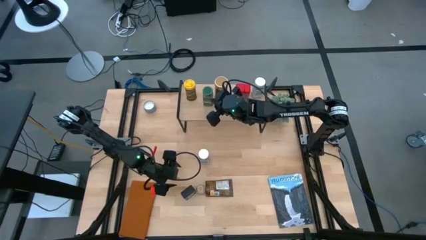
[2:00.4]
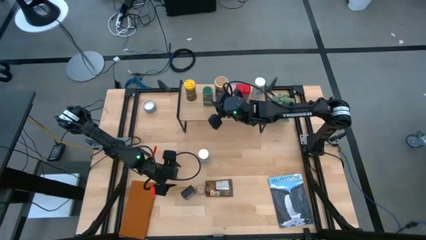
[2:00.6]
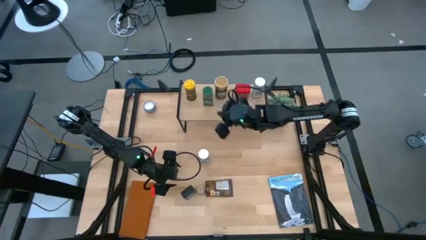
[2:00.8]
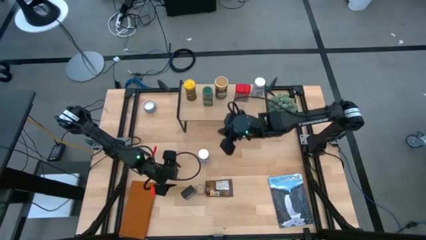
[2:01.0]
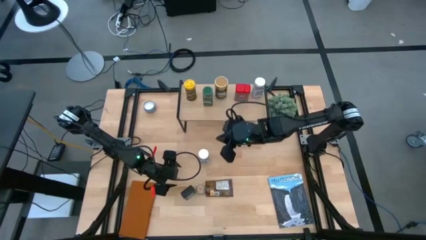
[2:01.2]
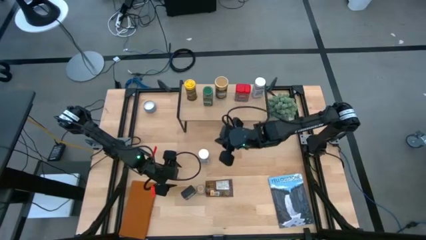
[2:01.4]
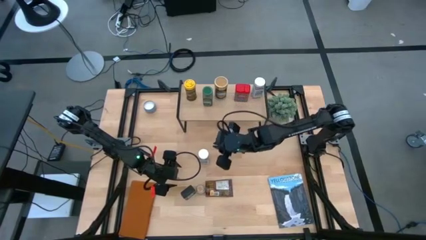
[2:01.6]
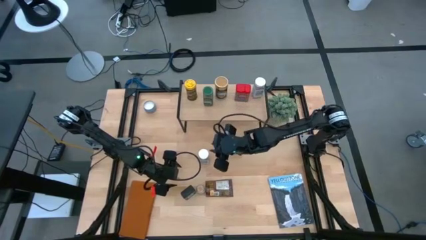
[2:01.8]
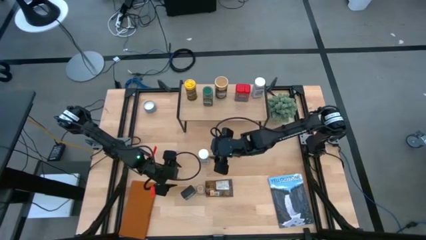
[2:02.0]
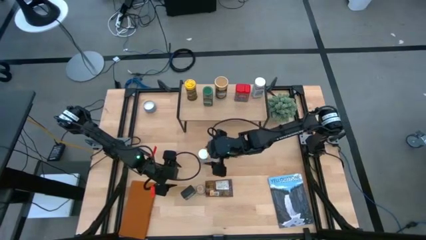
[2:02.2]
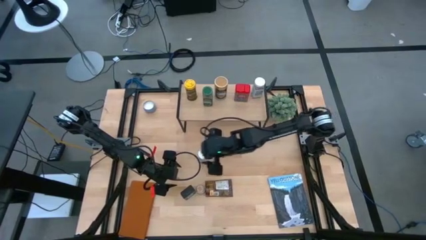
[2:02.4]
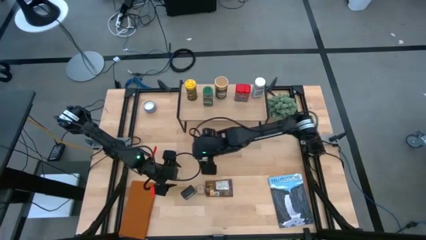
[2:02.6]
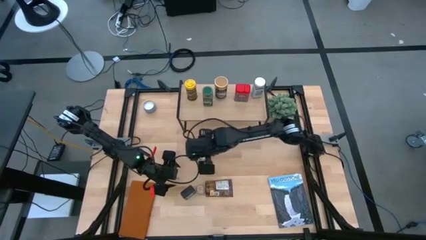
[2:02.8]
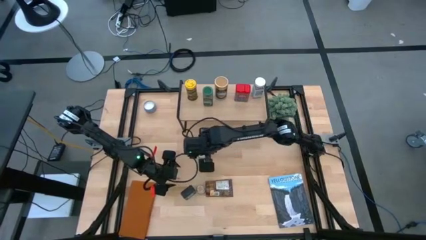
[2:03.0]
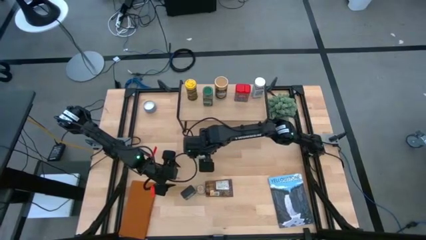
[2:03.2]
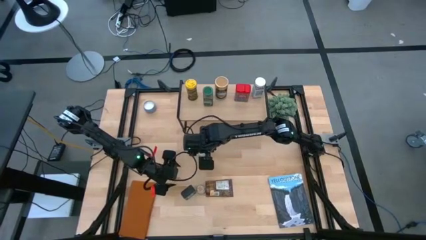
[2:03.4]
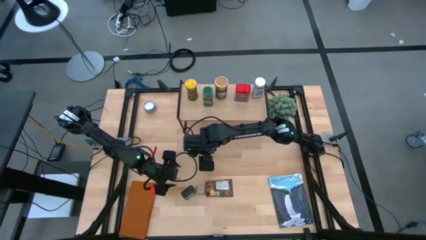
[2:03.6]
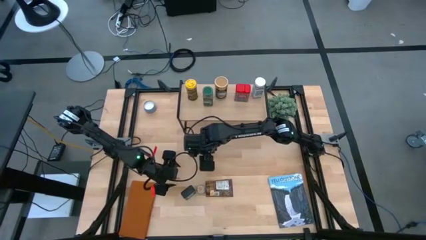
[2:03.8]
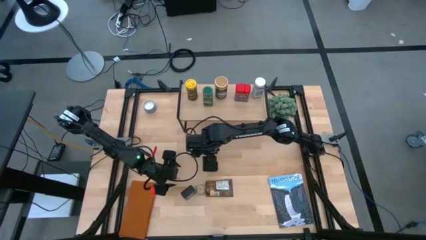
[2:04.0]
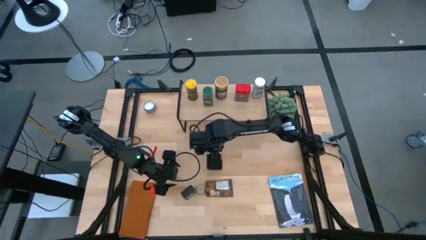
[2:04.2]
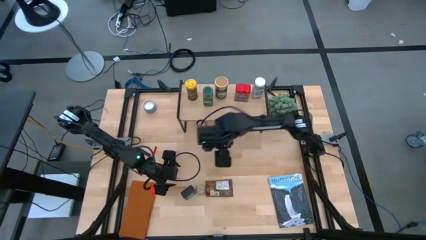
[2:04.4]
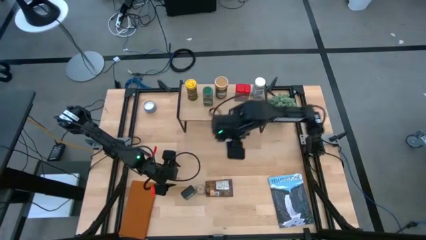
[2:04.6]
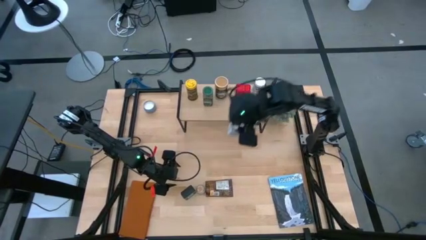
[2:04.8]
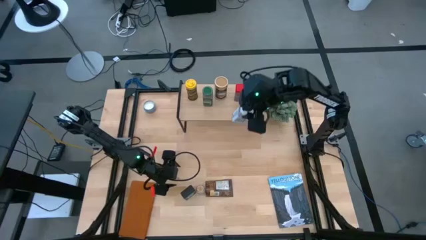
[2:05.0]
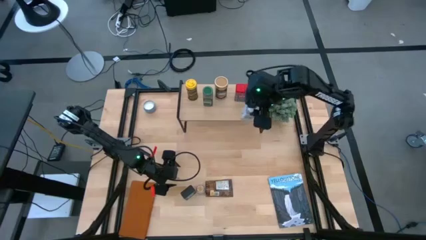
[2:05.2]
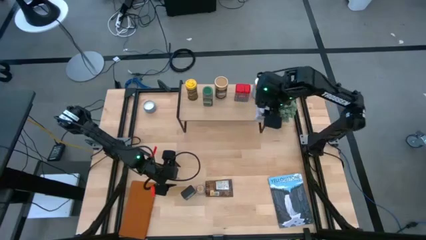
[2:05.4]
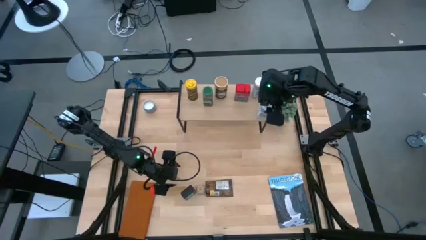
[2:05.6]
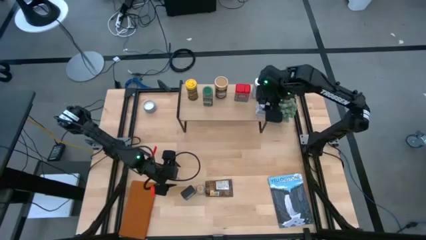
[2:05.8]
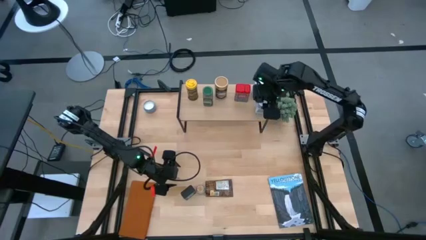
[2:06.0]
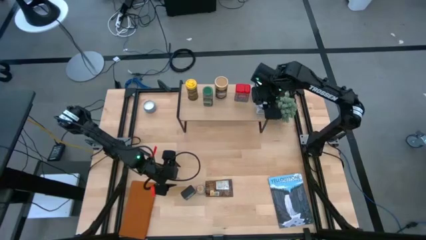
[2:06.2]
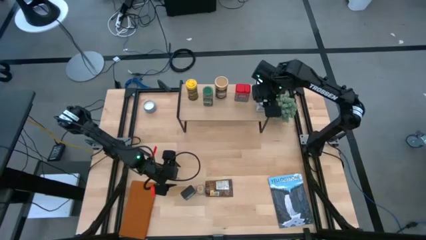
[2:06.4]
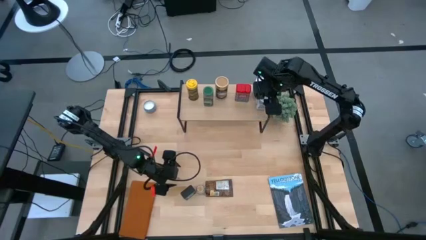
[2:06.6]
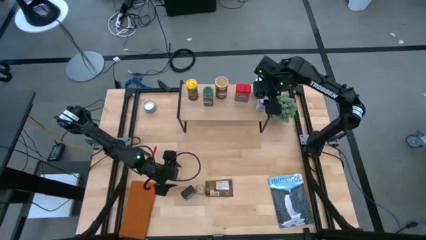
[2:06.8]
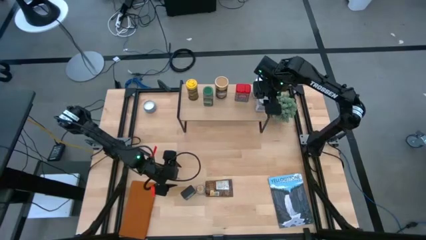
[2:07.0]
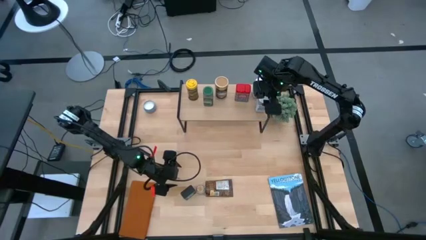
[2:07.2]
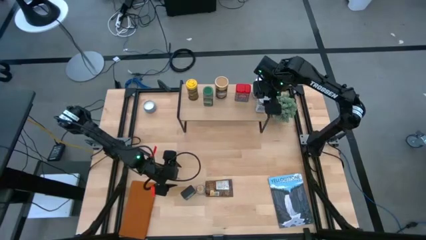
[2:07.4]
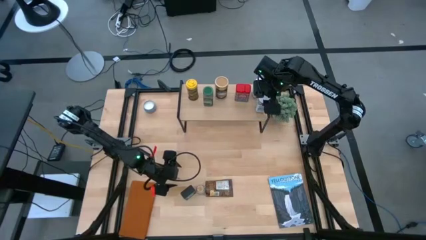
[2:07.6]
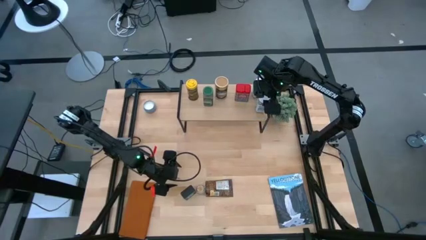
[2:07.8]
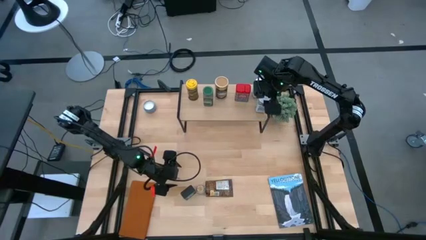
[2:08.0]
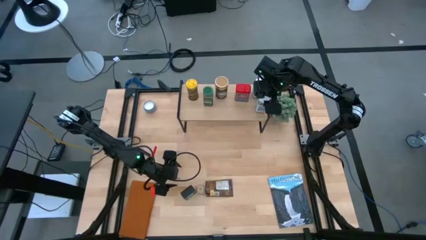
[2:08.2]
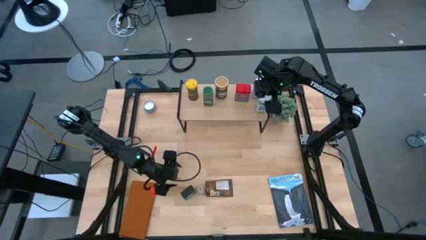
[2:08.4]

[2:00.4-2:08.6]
Task: Shelf spices
Put the white seasoning bottle on the shelf
